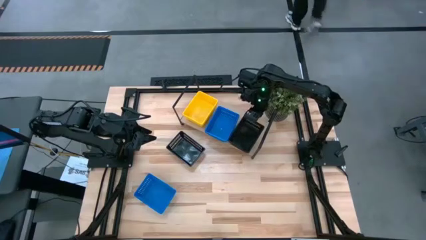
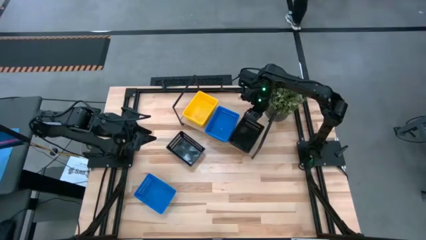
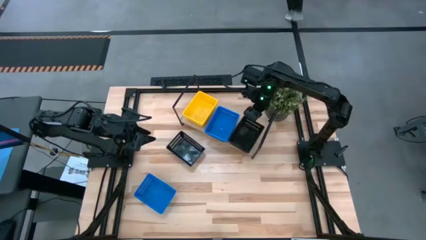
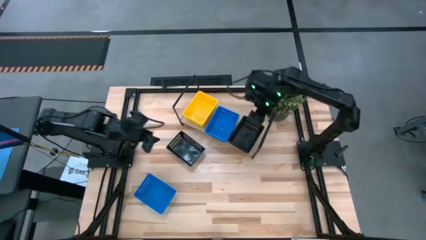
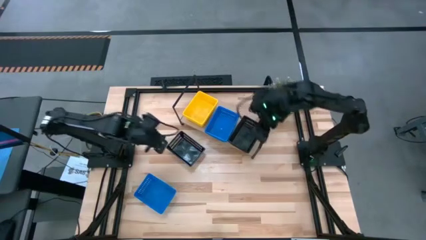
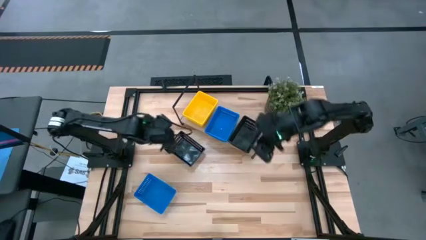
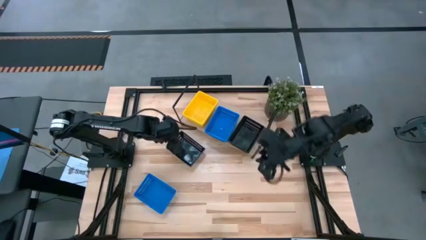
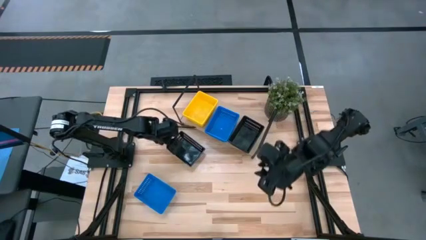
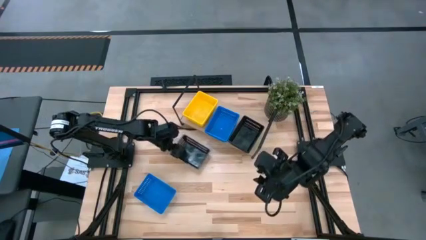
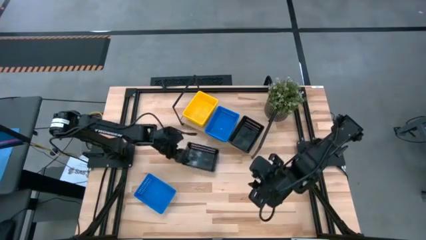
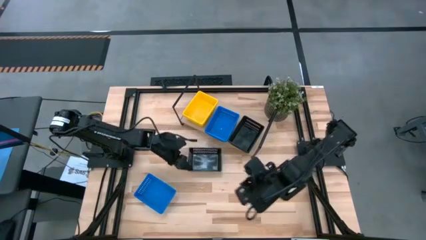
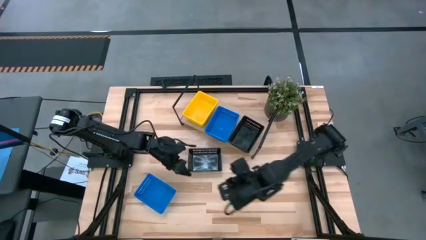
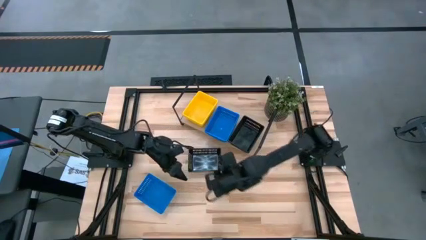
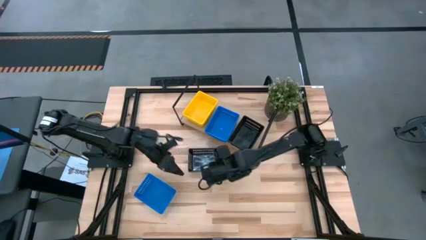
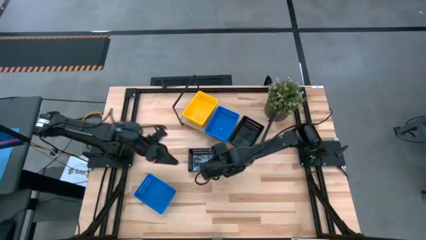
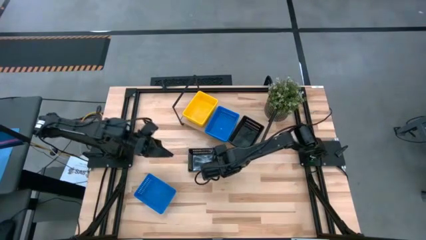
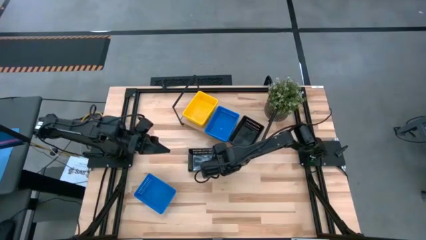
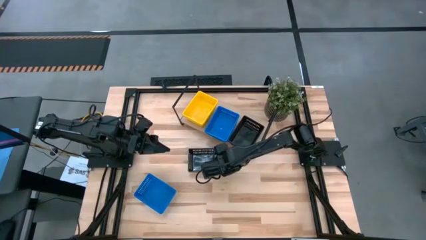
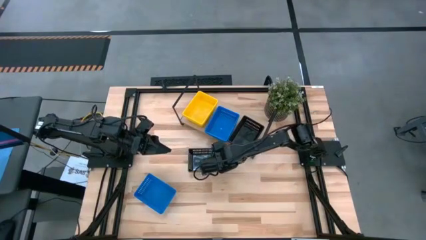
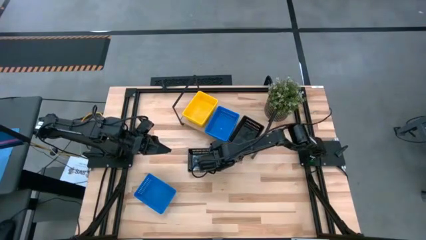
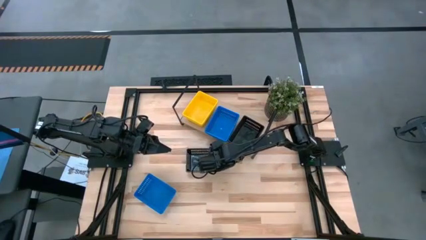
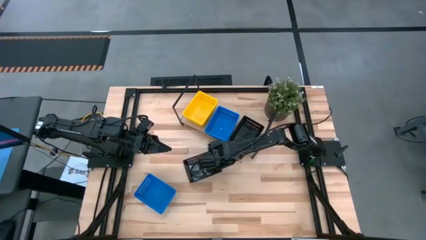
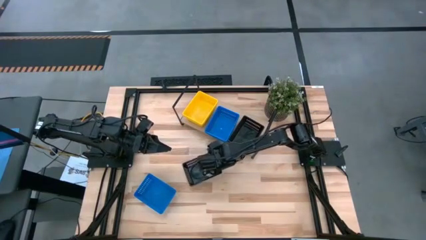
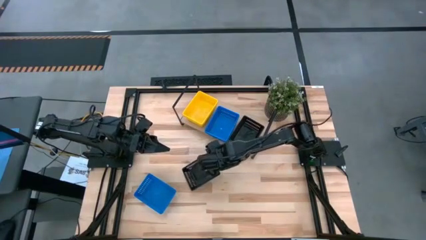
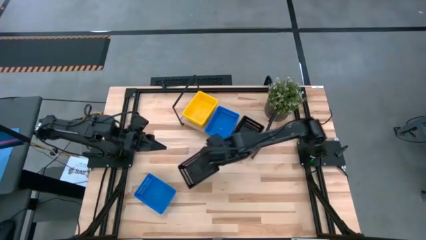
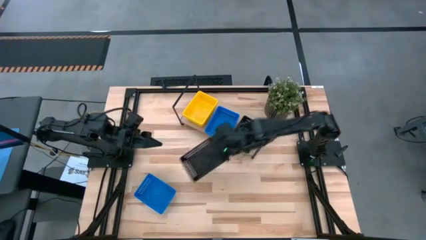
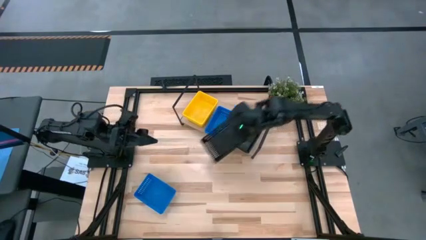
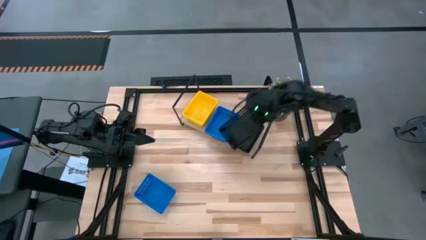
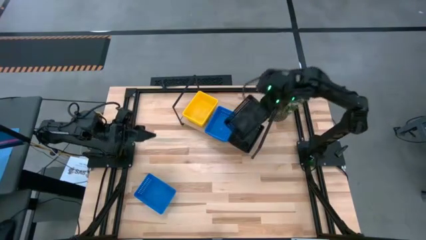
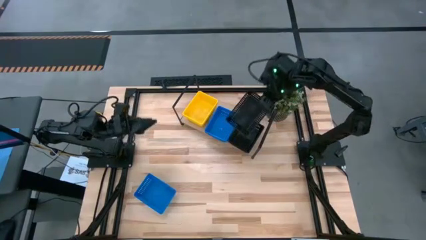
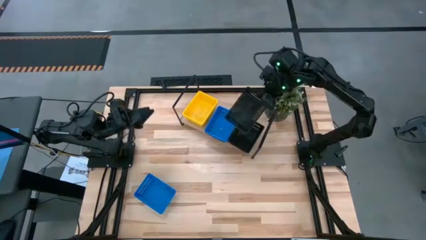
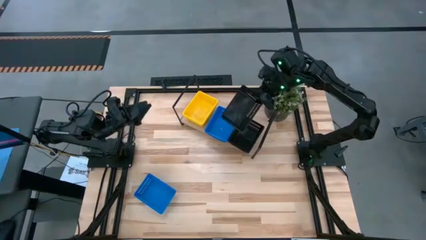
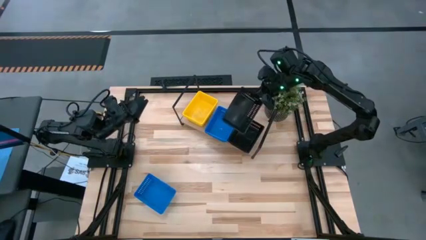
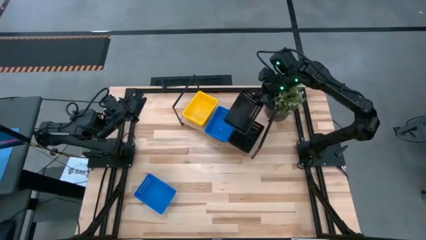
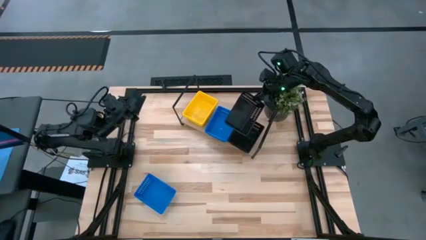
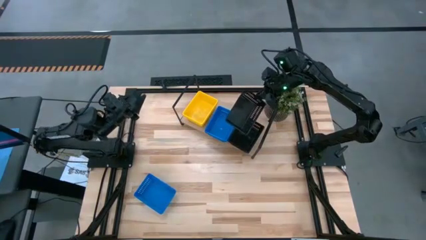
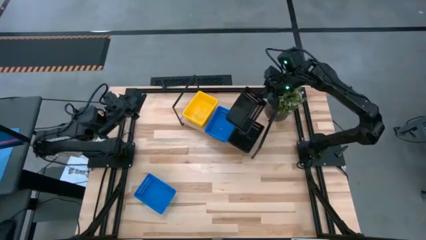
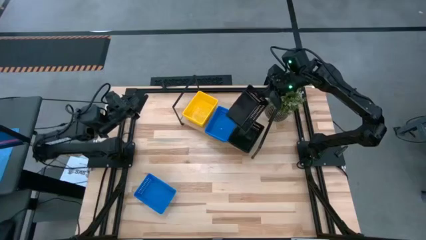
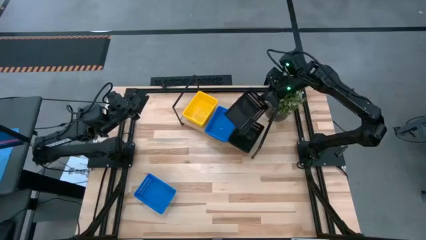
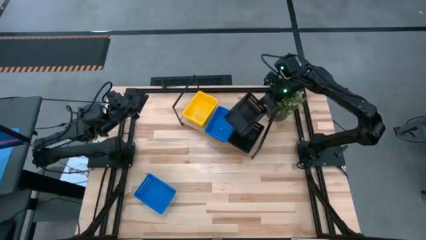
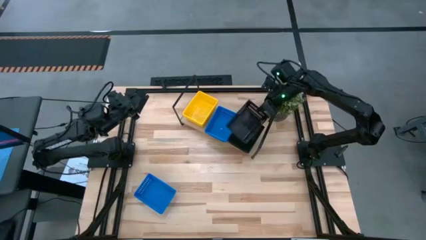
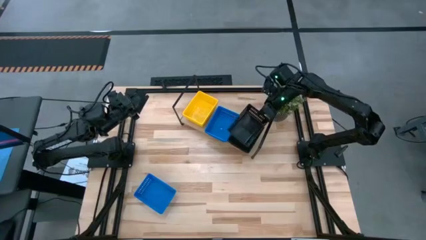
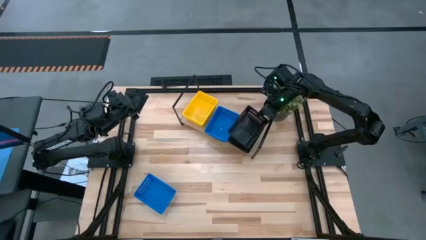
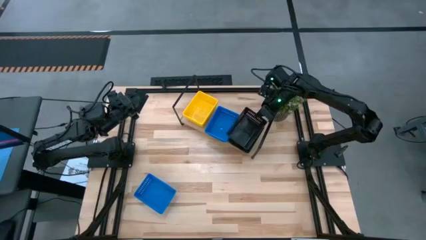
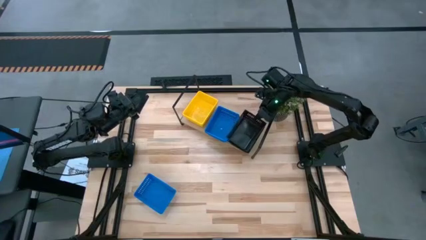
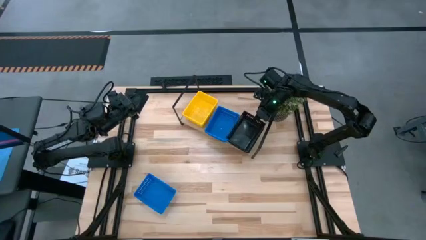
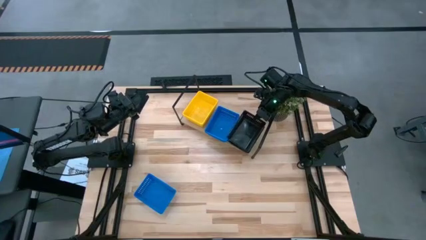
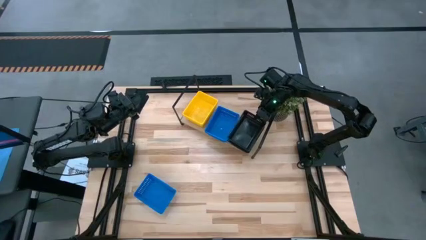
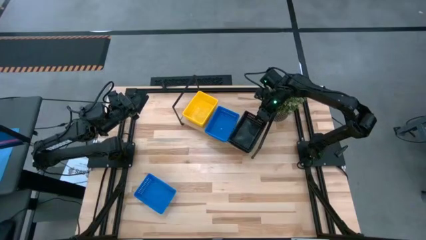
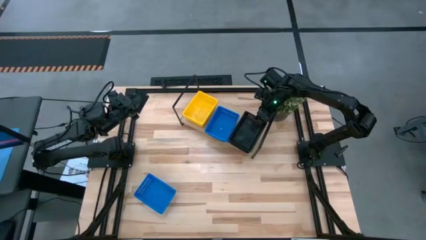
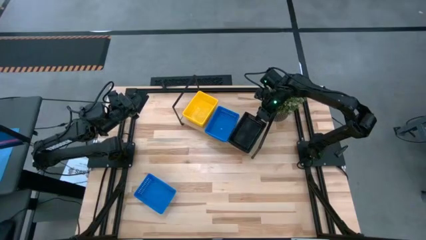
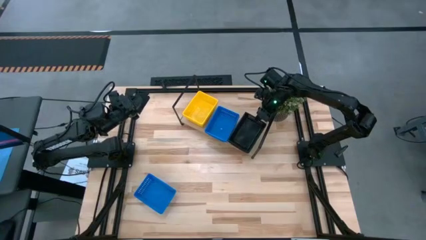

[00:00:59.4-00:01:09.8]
Task: Stack baskets on shelf by color
Stack the black bin on the top of the black bin on the shelf
